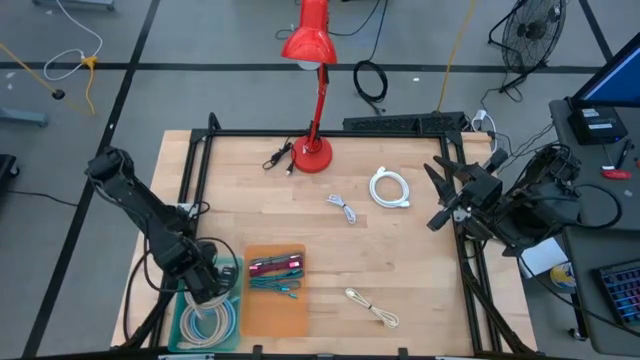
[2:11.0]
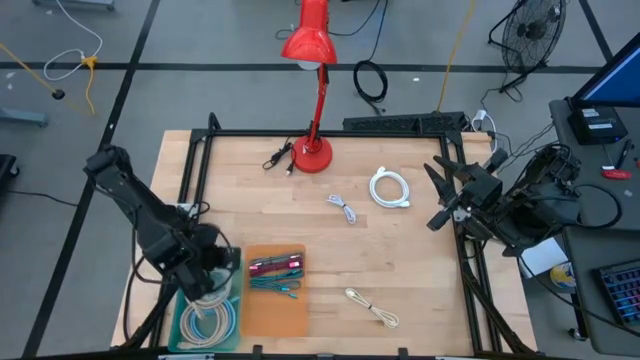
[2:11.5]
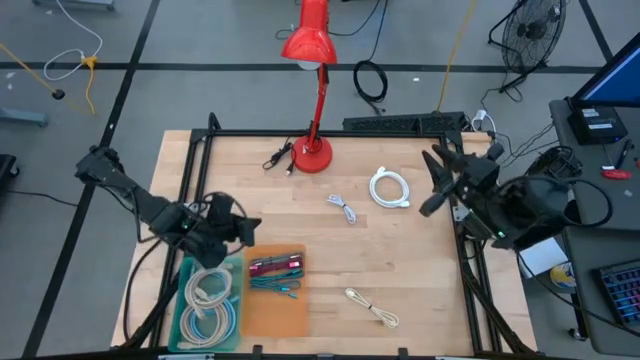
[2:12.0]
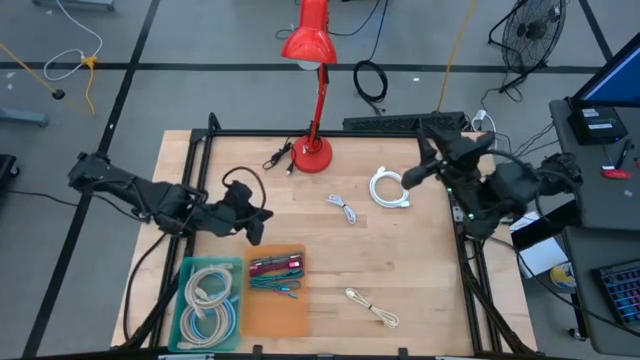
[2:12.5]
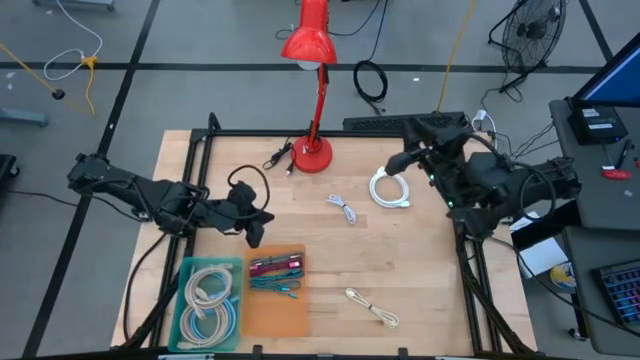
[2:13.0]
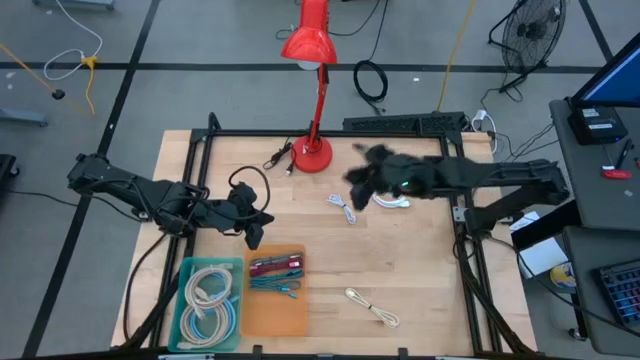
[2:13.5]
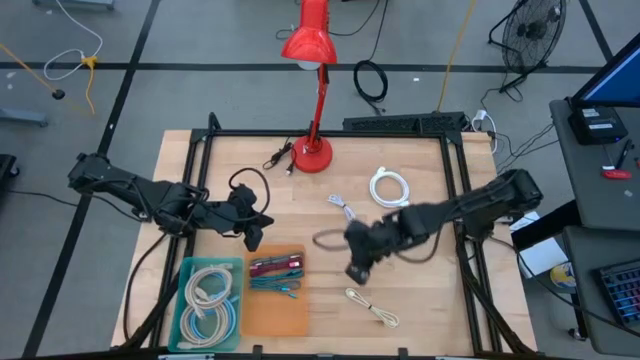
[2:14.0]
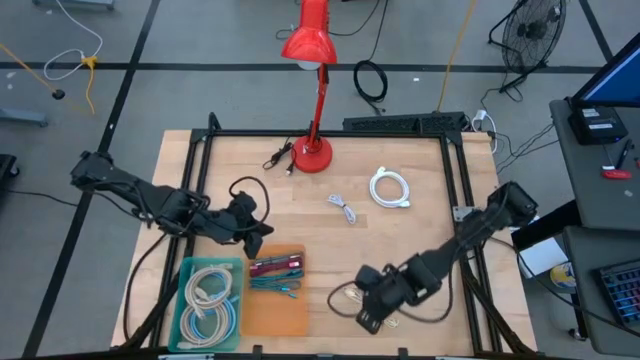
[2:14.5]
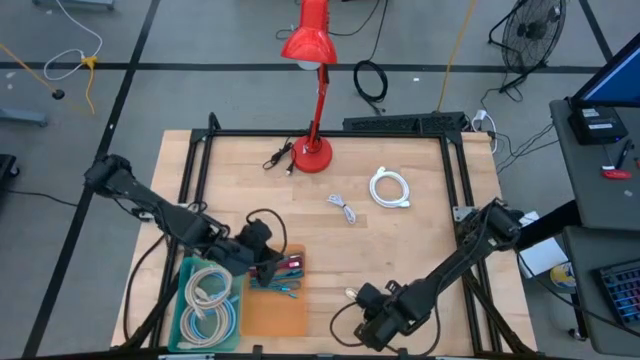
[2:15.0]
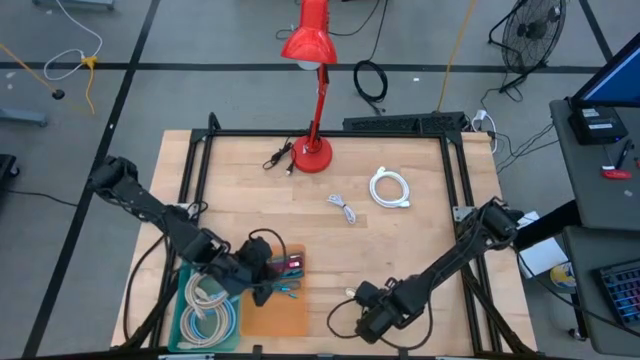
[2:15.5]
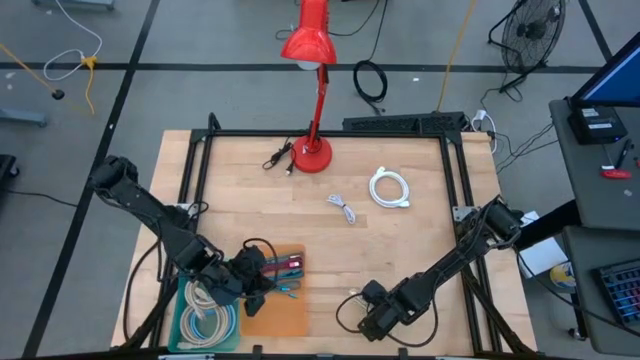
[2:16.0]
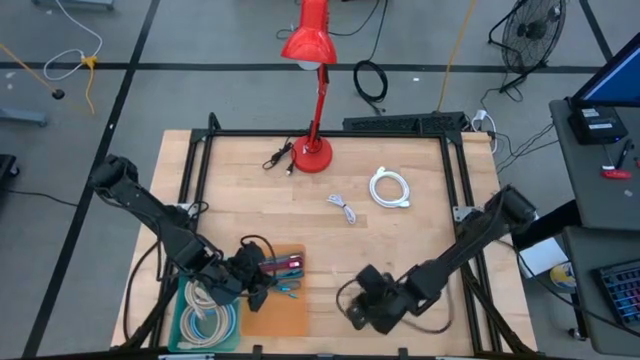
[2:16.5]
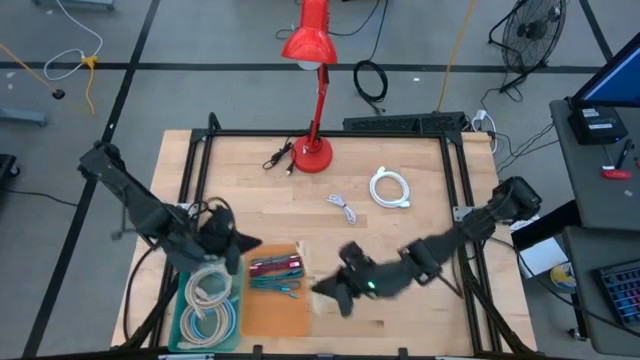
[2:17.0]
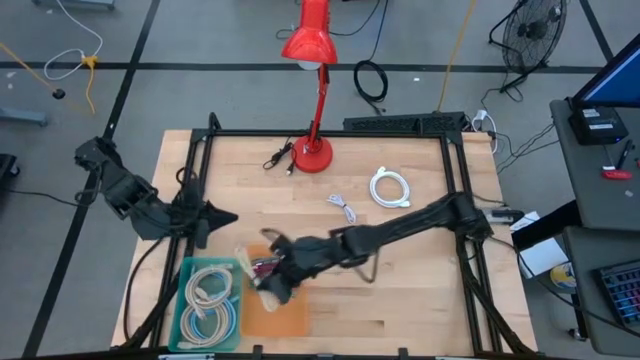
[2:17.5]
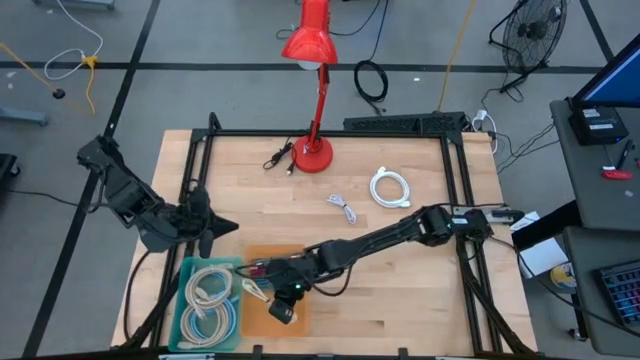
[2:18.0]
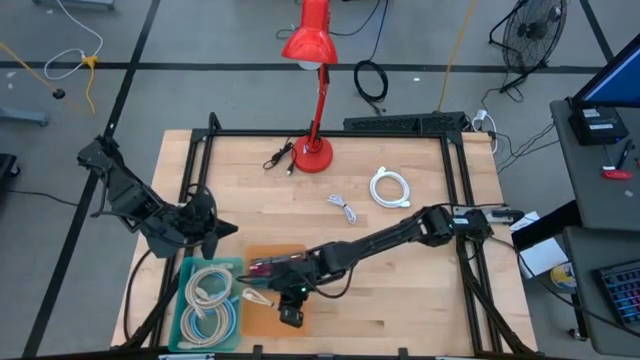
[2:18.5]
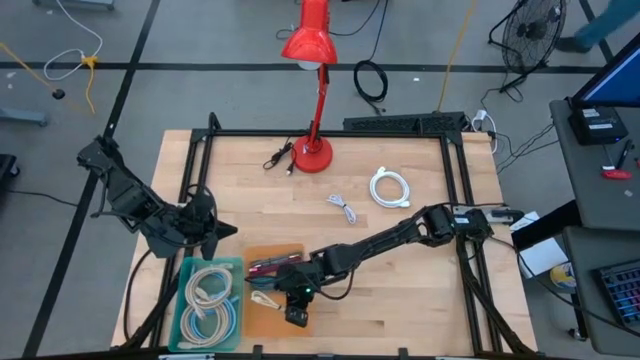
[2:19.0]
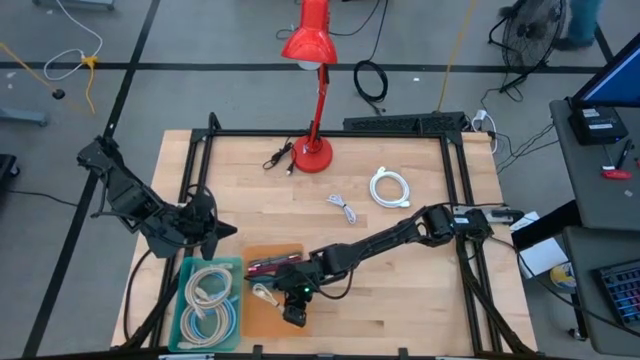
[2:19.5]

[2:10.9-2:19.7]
Task: Pick & Place USB Port
Put the brown USB cable into the orange bin

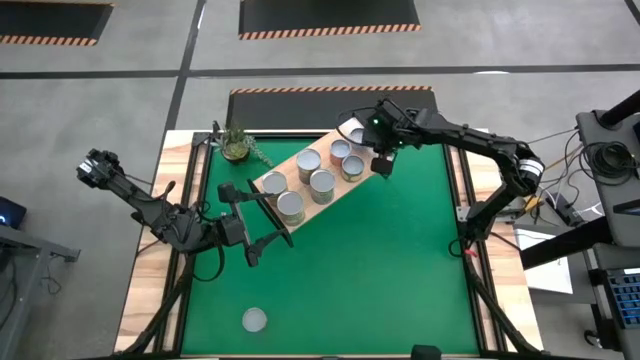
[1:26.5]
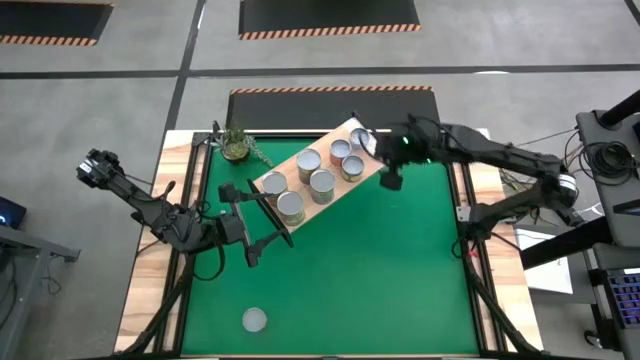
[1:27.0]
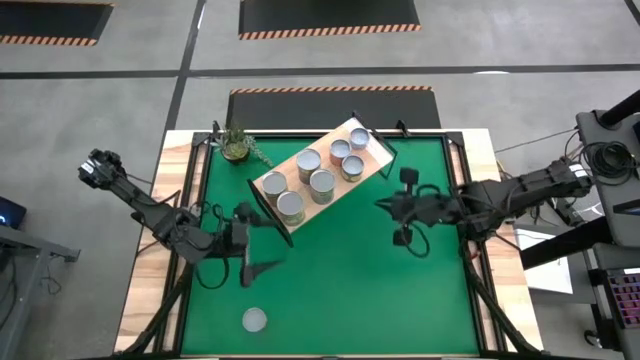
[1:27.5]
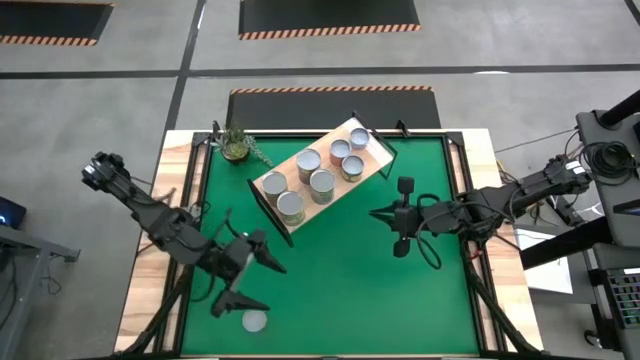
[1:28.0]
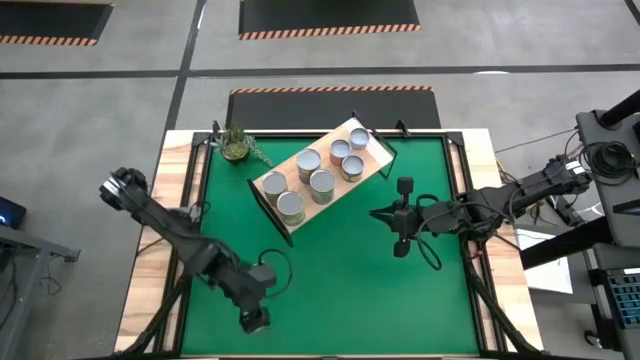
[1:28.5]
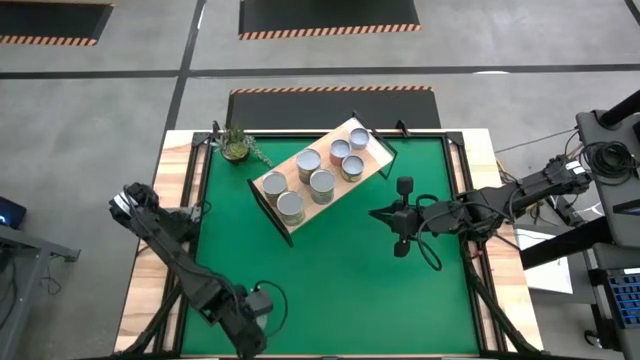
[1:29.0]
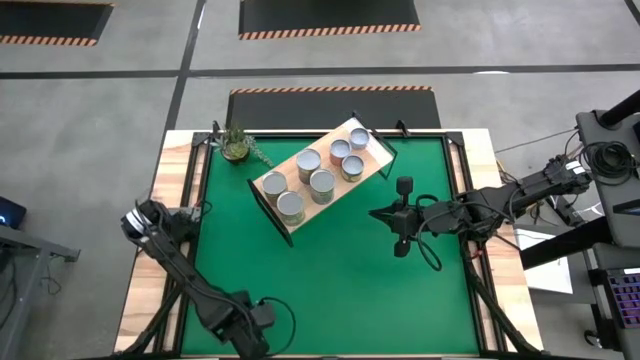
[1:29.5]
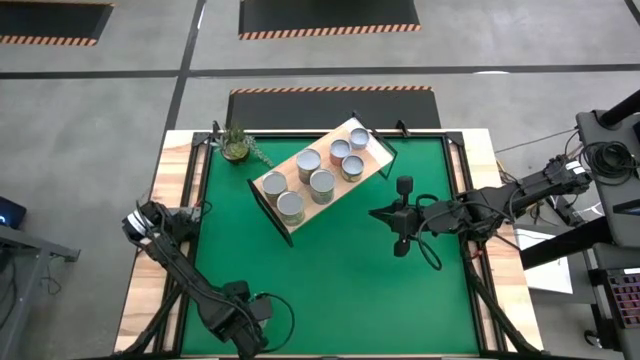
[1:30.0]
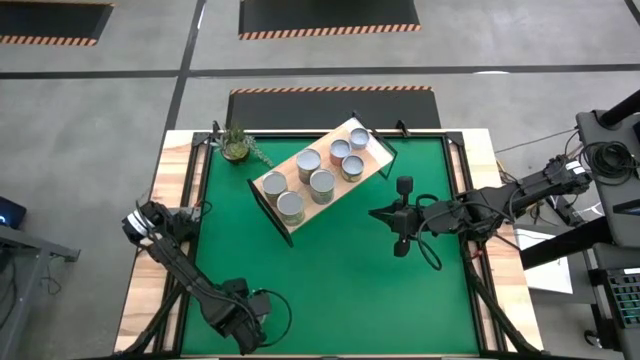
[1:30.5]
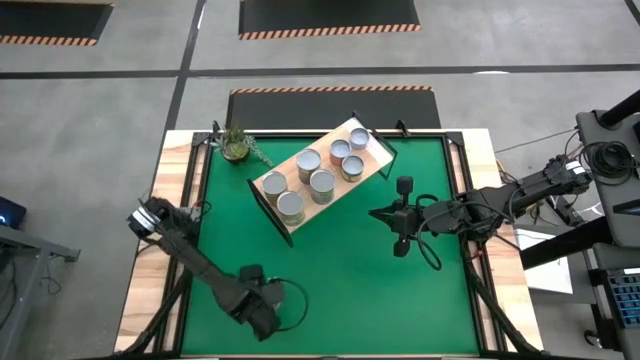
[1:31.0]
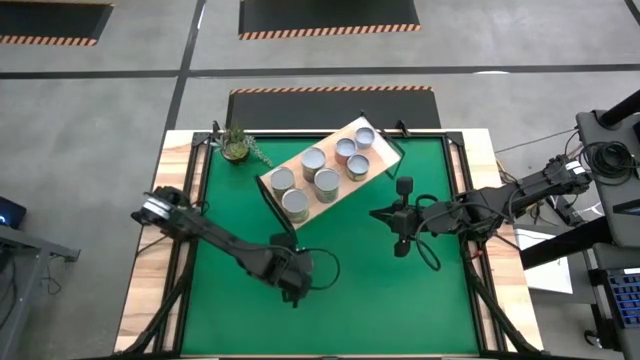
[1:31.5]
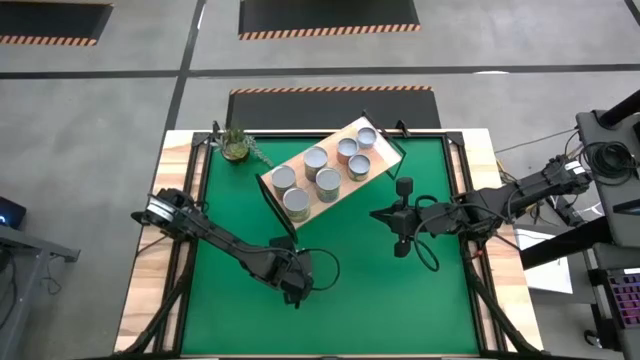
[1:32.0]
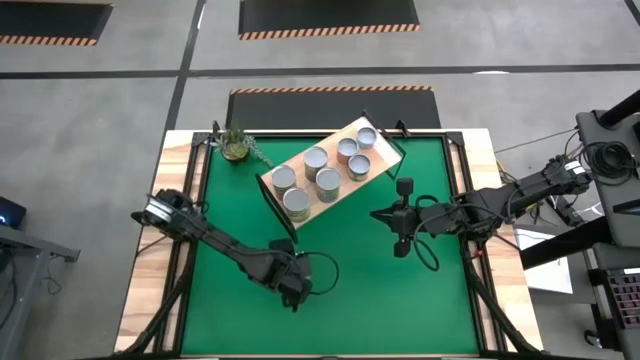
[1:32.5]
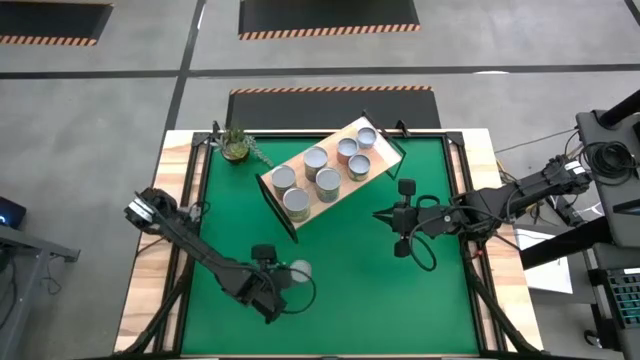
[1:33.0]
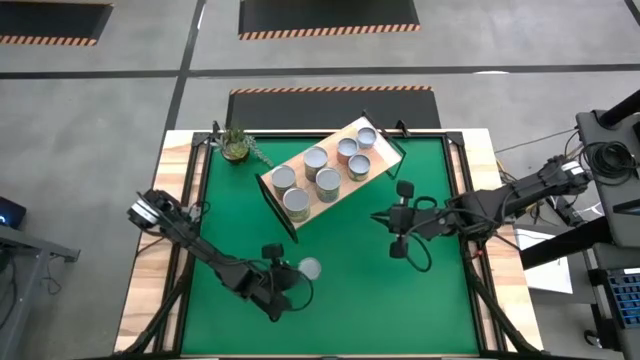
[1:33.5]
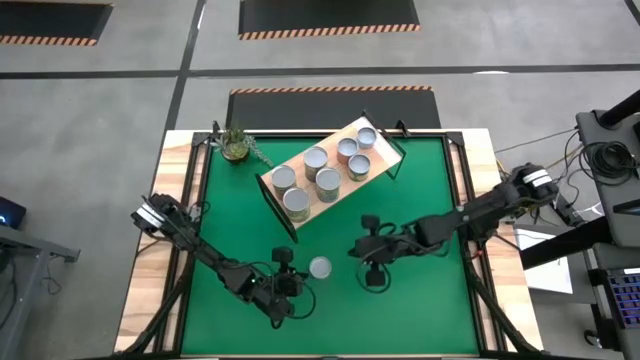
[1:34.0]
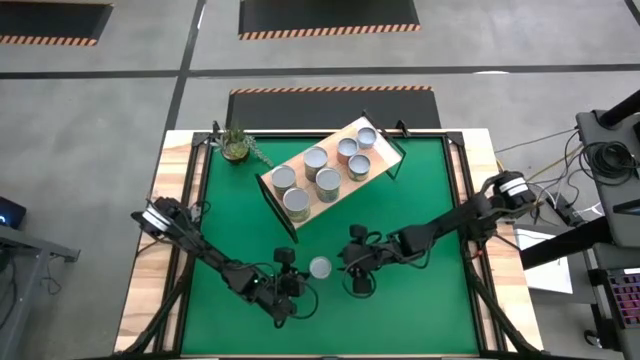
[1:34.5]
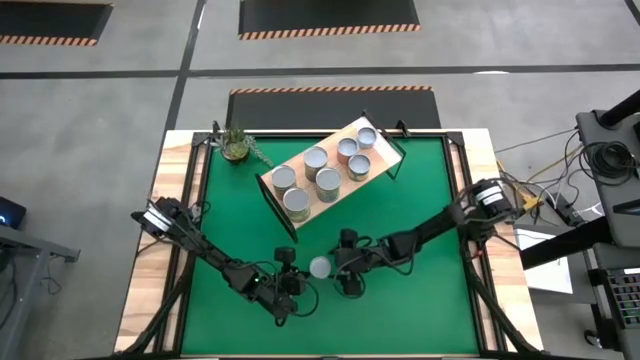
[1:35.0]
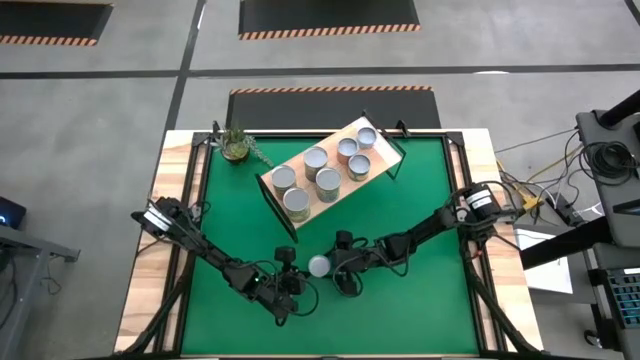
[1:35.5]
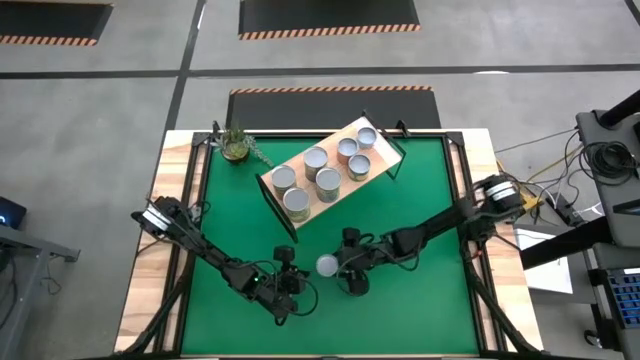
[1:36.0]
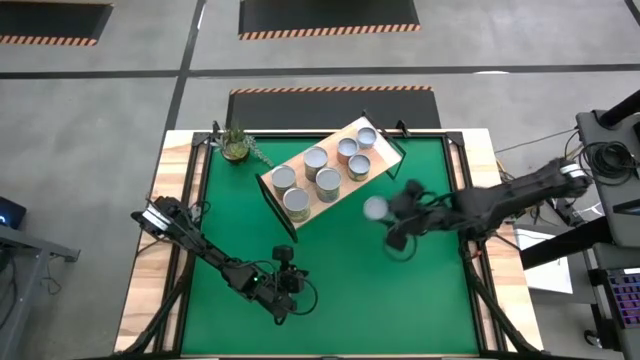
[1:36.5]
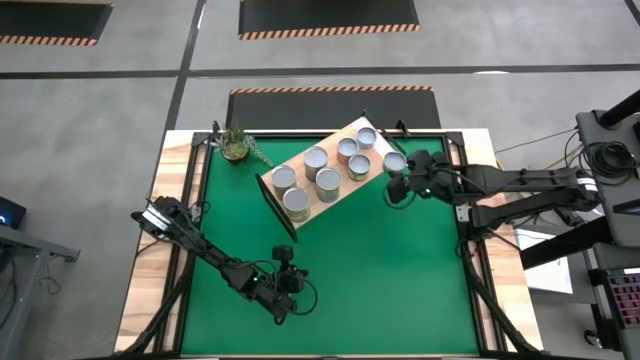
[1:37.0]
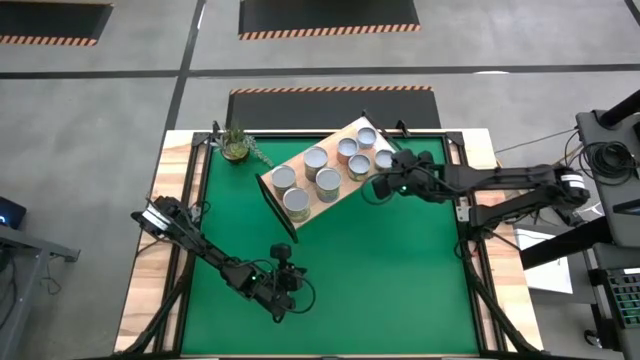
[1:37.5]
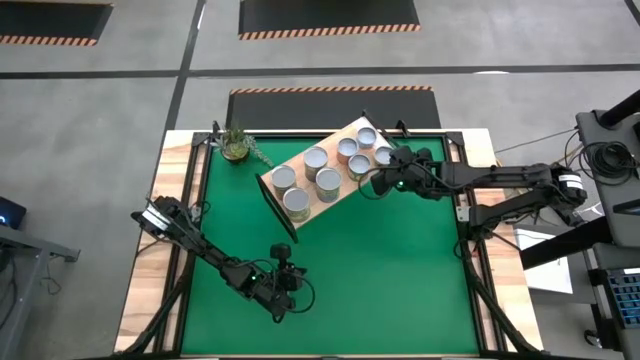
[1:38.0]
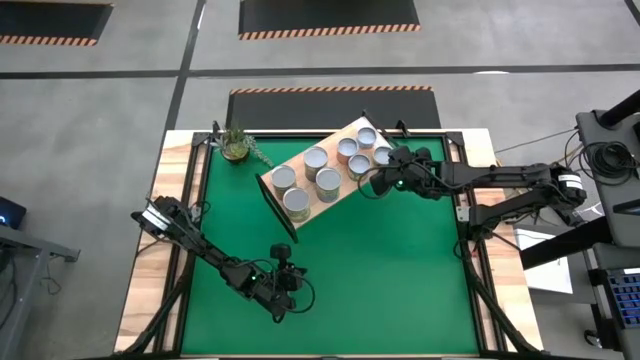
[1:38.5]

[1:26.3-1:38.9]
Task: Pick and place cans onto a shelf
Put the yellow can on the shelf
